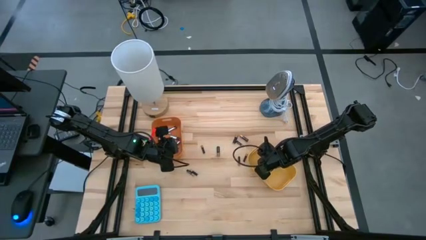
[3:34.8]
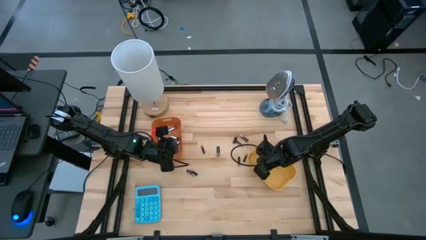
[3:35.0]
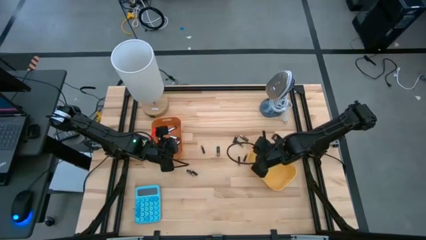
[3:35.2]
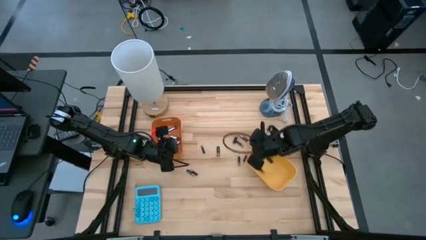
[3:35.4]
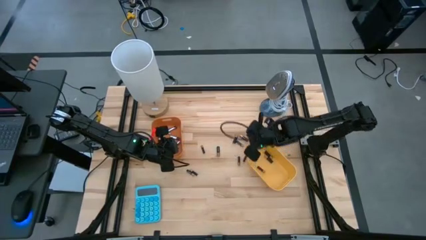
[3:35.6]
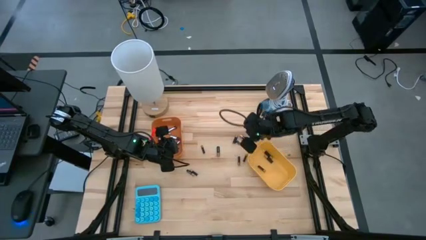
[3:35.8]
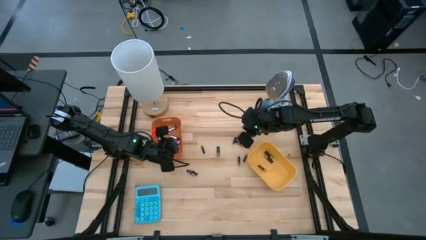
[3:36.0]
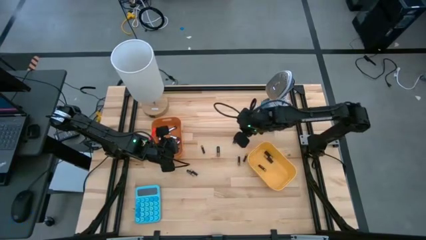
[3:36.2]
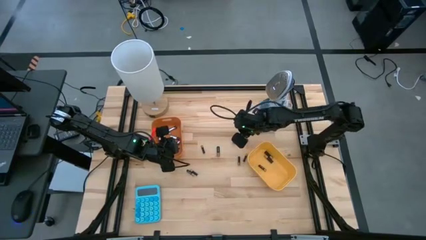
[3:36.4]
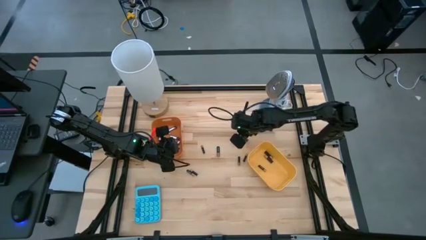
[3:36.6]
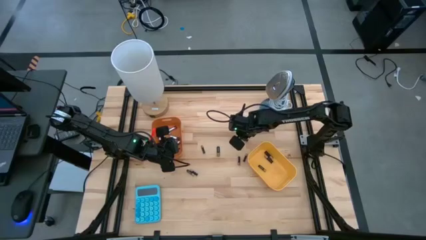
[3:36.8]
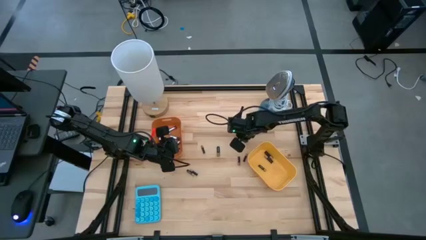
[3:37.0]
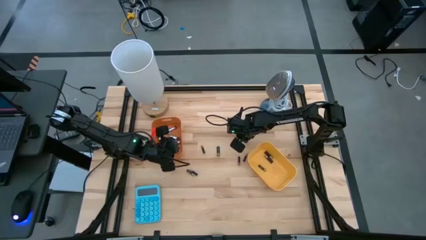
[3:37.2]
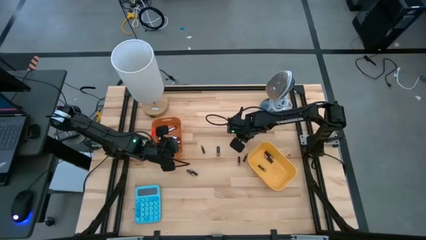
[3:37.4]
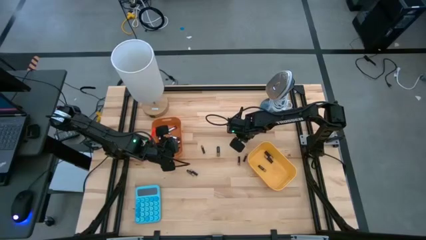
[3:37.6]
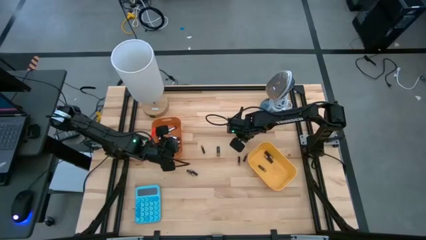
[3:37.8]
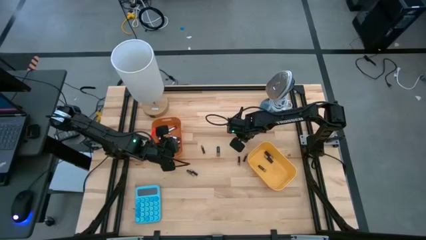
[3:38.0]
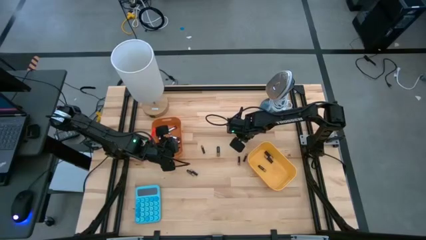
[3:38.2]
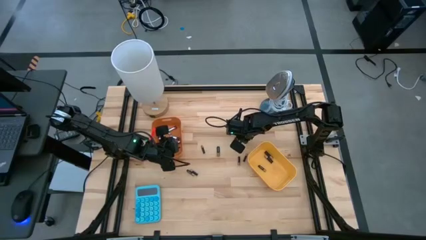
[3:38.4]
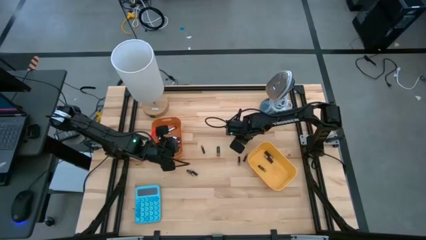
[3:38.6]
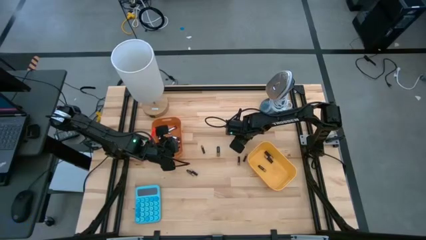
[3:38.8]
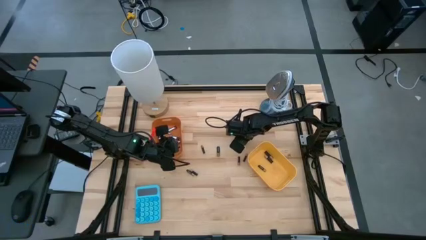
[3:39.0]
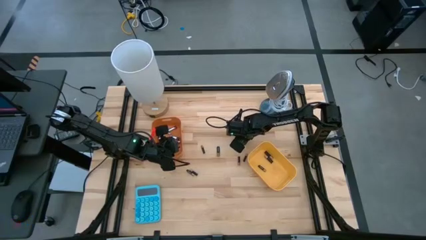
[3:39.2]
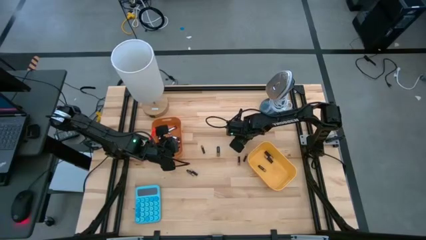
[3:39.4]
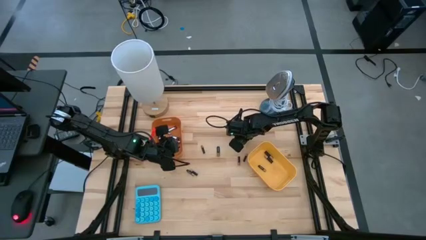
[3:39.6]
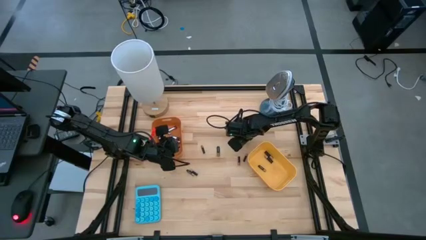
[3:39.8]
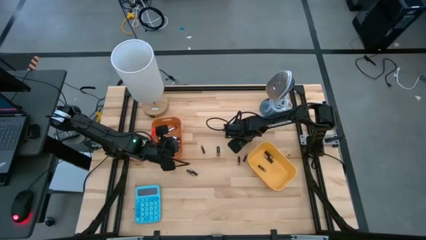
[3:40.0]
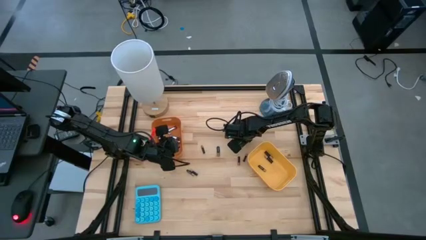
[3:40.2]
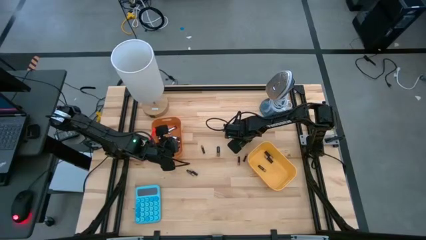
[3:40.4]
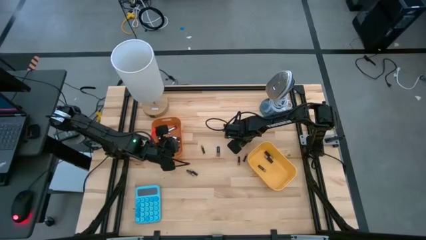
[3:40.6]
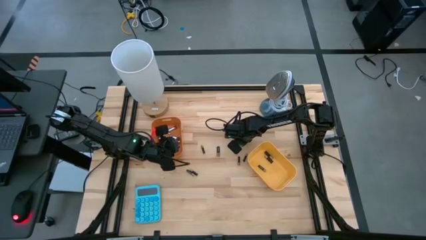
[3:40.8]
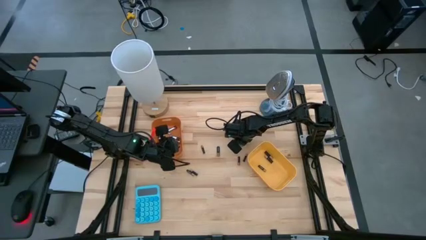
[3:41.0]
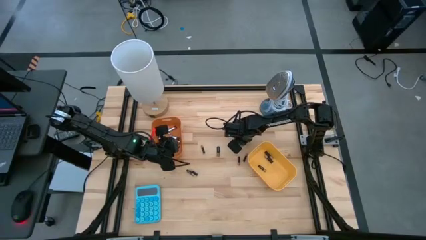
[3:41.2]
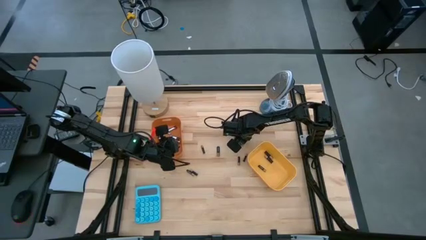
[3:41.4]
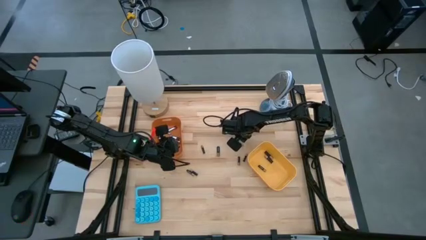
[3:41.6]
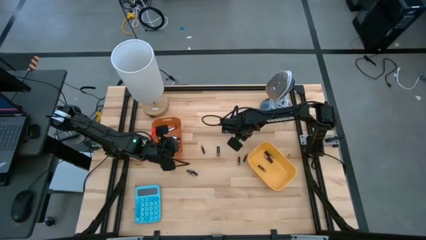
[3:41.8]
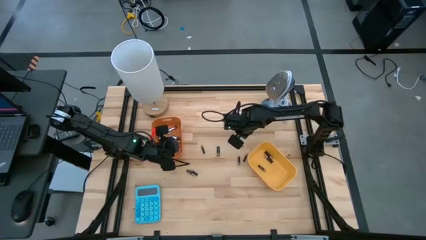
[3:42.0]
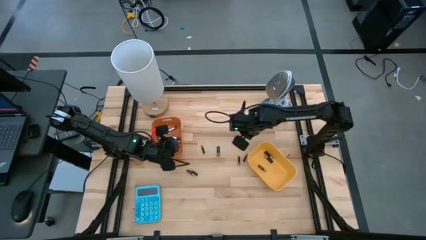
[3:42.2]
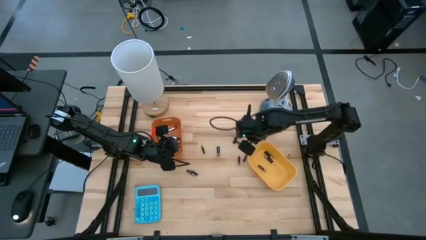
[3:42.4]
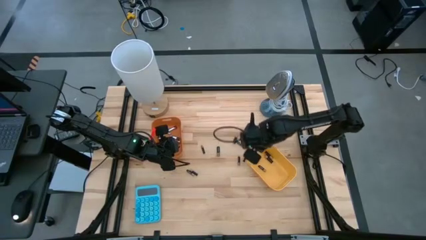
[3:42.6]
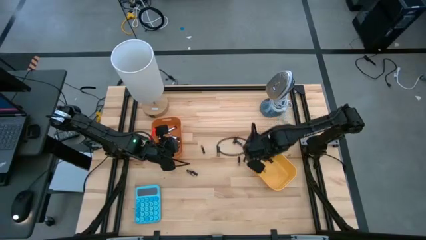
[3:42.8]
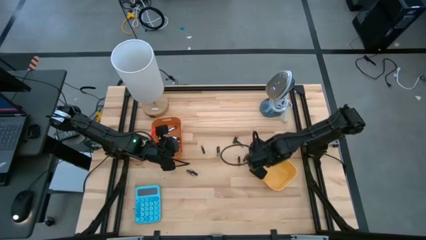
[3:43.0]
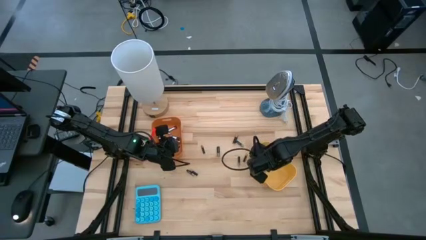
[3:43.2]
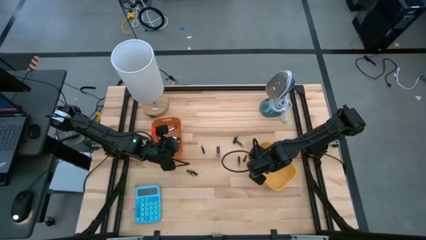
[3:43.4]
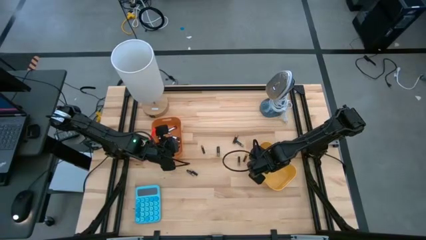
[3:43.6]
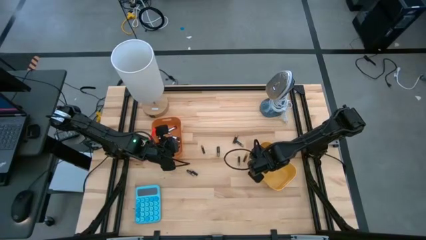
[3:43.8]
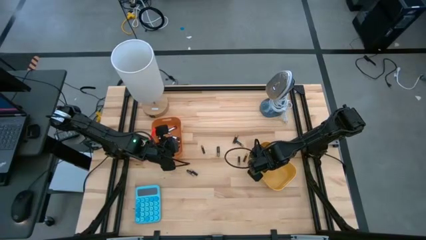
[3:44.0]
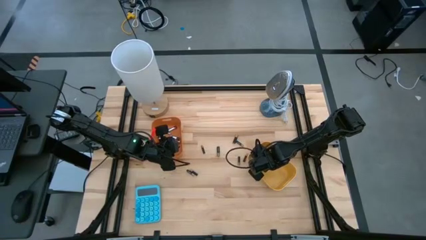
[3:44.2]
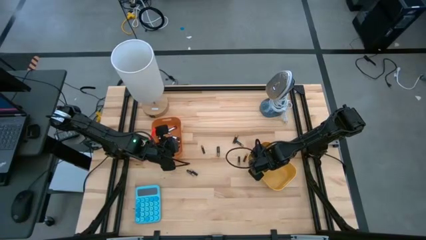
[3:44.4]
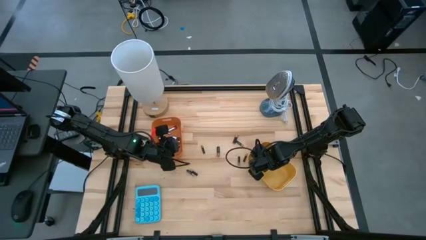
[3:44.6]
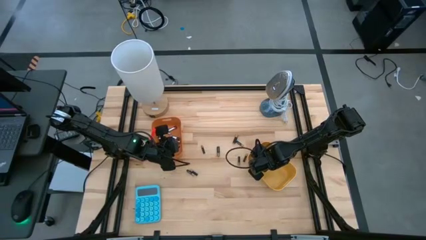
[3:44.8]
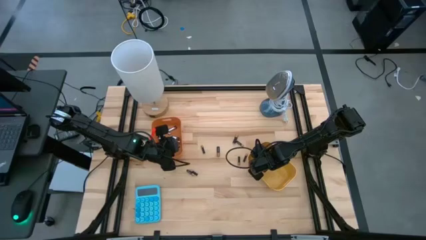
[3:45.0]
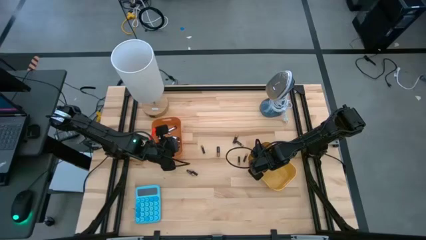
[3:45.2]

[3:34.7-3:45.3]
Task: Sort batteries
Put the gold battery into the yellow bin

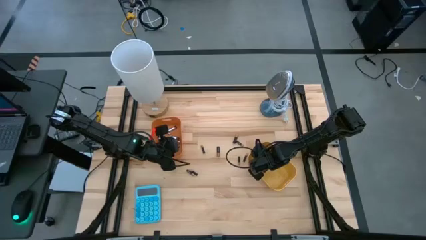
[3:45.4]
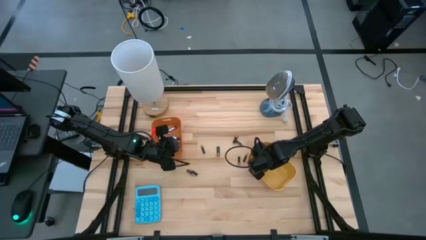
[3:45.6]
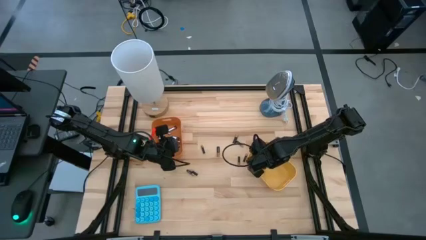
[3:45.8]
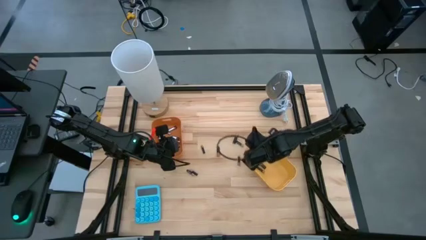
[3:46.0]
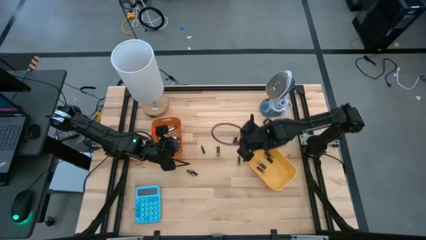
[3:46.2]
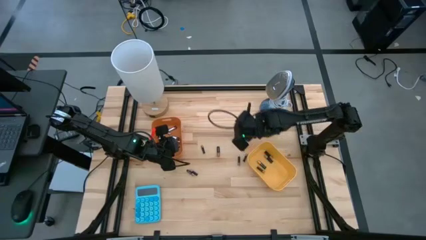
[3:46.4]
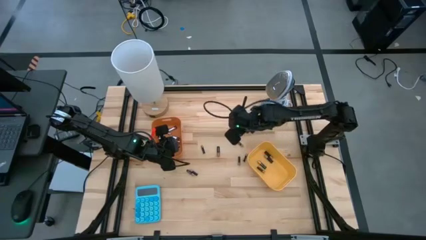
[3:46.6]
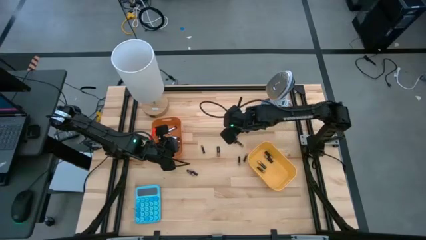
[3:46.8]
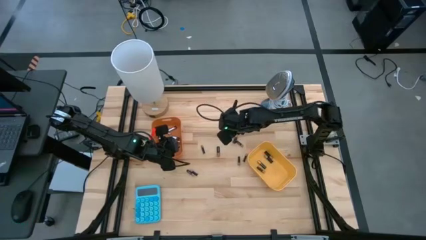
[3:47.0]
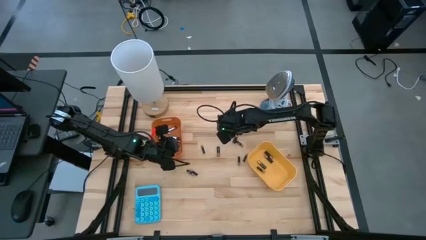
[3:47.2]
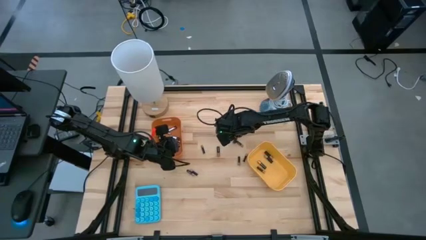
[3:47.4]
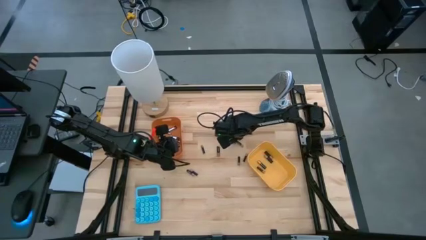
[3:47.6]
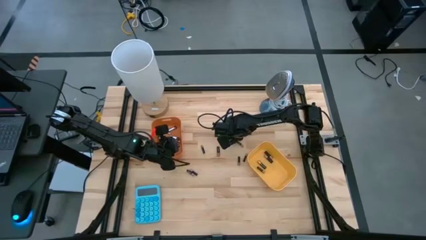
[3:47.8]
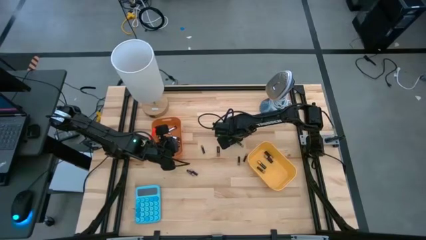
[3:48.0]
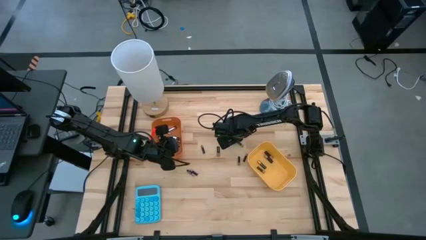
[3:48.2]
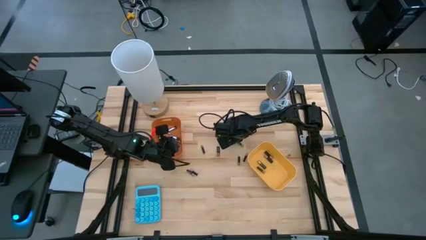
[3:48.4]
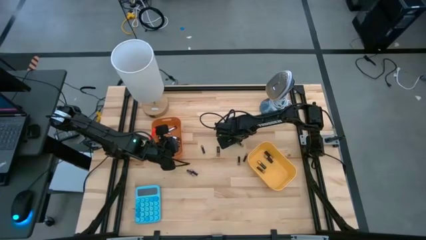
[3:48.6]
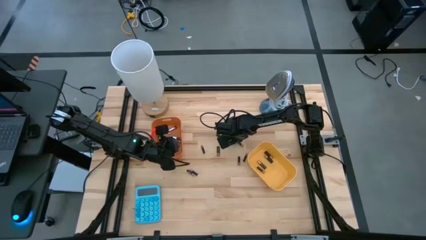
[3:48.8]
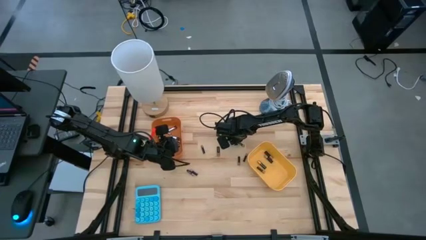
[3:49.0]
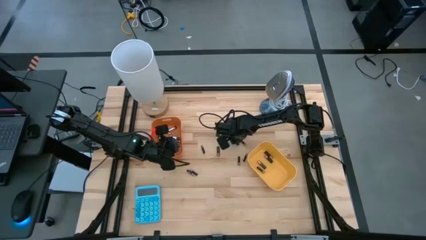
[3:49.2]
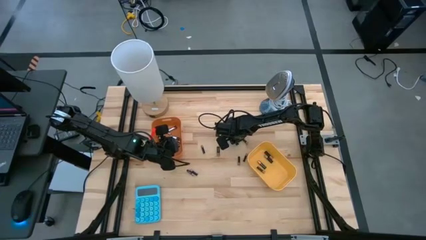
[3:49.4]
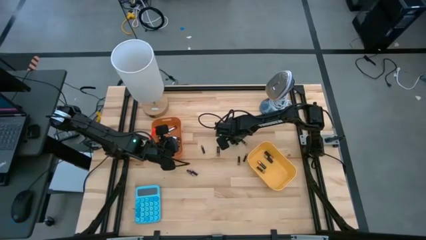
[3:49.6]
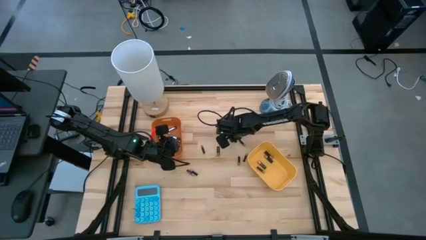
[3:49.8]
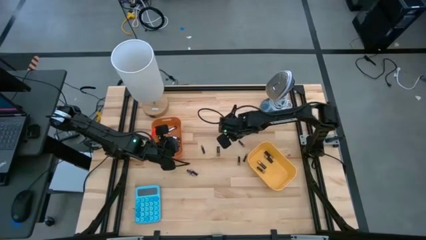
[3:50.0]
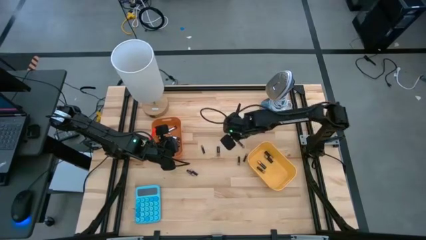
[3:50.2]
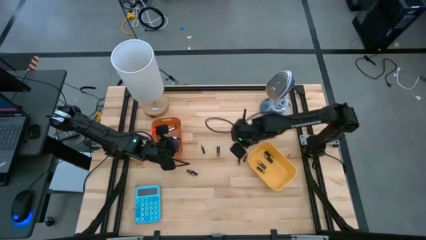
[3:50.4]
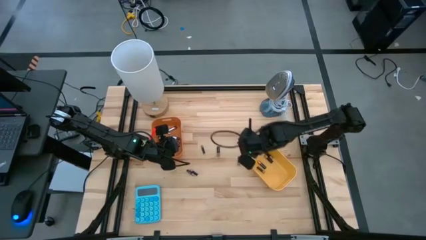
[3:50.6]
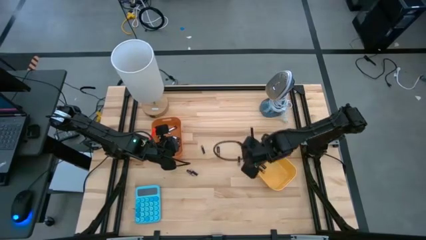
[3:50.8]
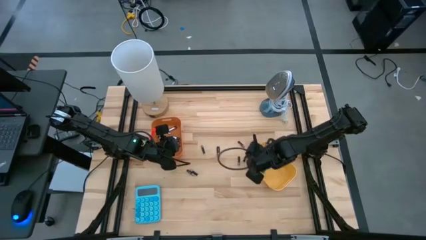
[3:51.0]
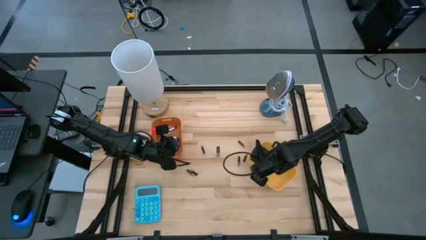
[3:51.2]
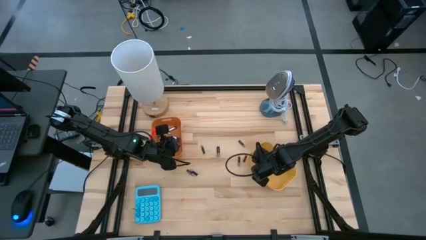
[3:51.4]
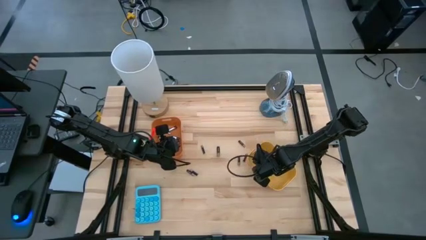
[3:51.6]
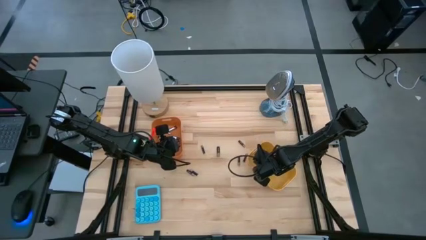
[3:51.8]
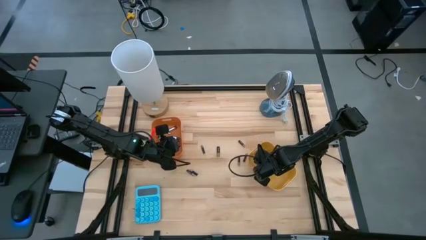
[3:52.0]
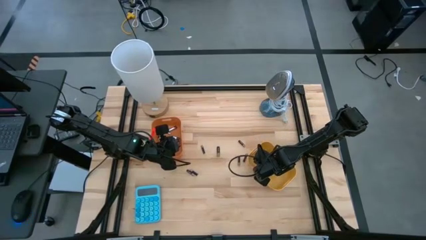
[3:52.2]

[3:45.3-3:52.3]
Put the gold battery into the yellow bin

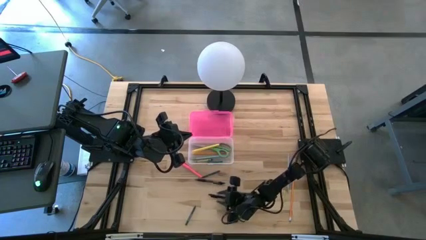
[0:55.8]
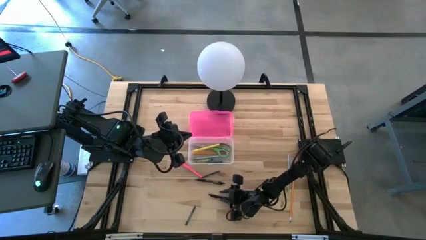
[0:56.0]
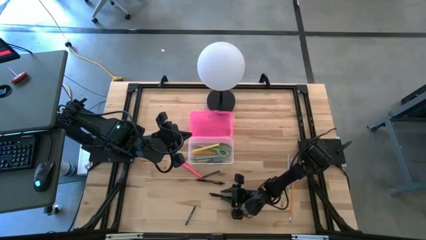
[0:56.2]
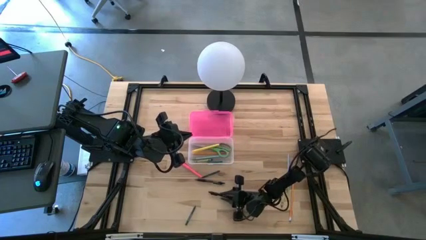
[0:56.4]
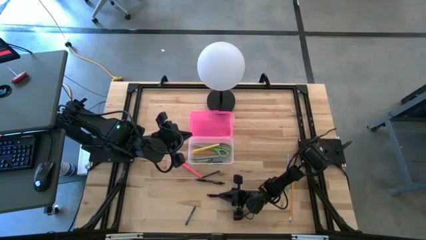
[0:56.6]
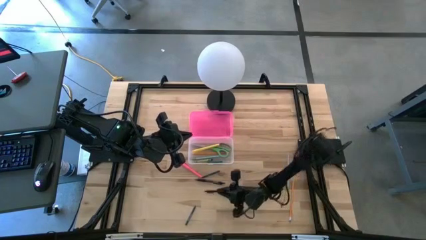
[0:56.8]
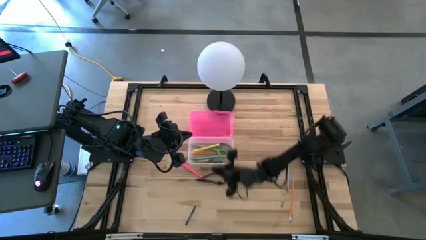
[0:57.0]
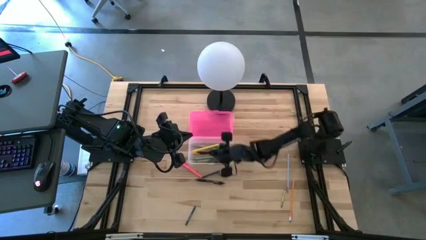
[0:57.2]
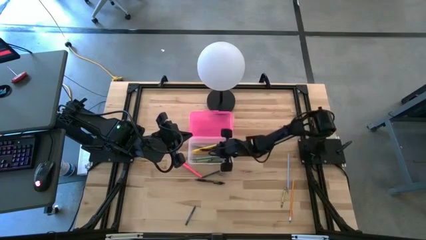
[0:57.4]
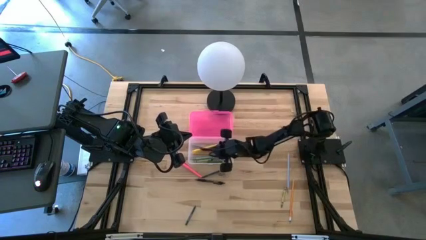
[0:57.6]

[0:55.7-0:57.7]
Task: Pick & place school supplies into a supply box
Put the bottom black pen into the pink supply box
